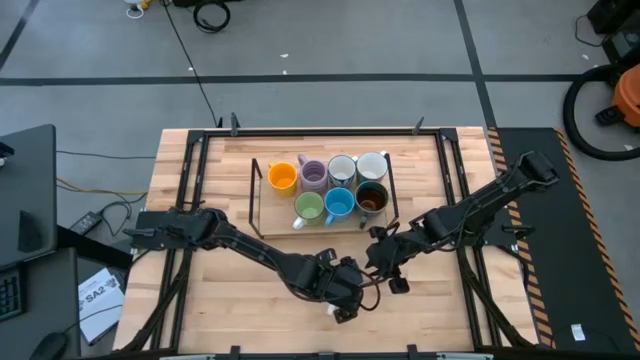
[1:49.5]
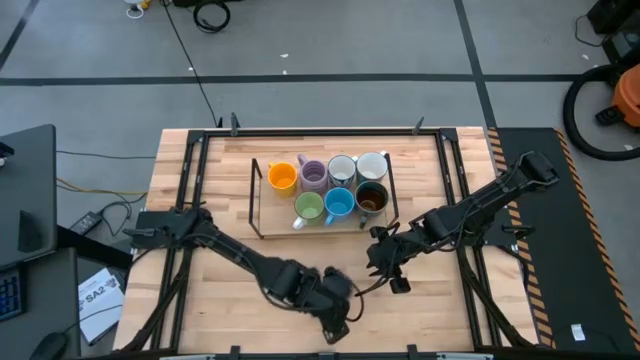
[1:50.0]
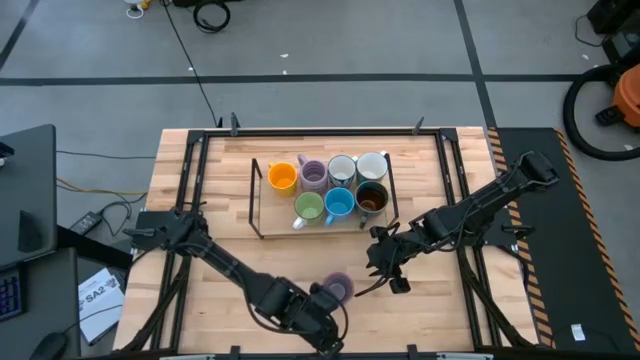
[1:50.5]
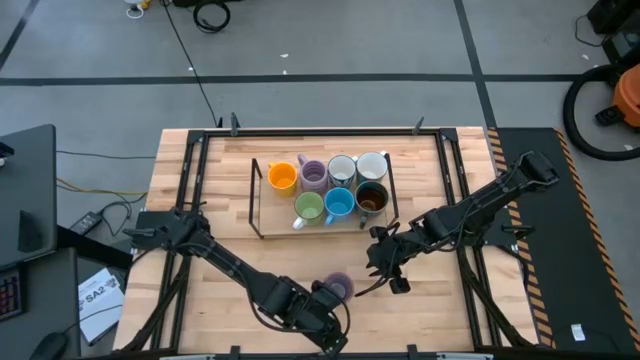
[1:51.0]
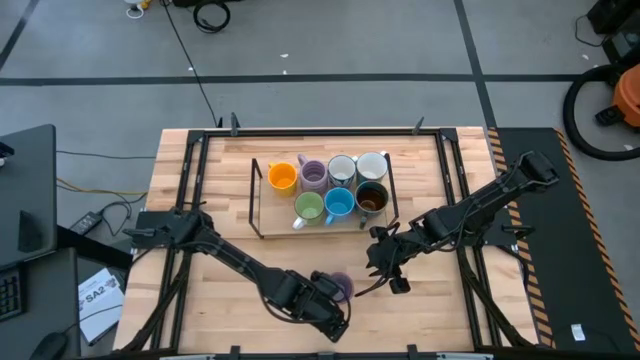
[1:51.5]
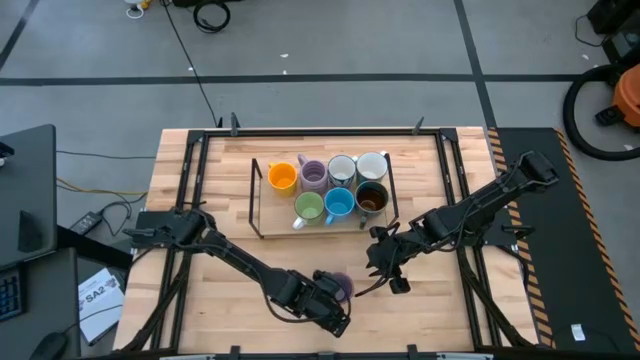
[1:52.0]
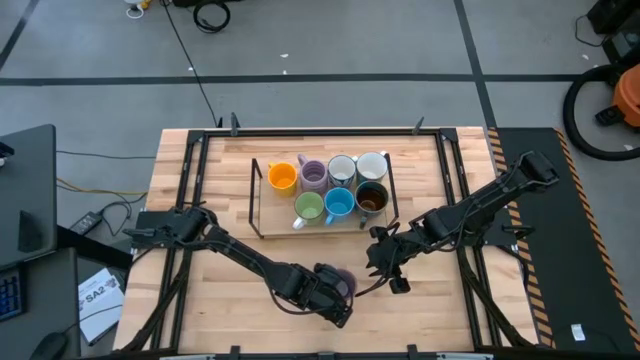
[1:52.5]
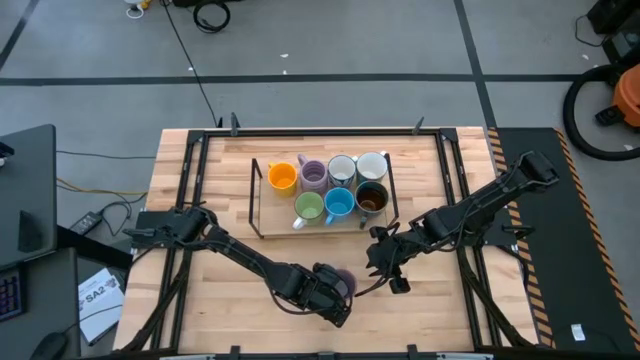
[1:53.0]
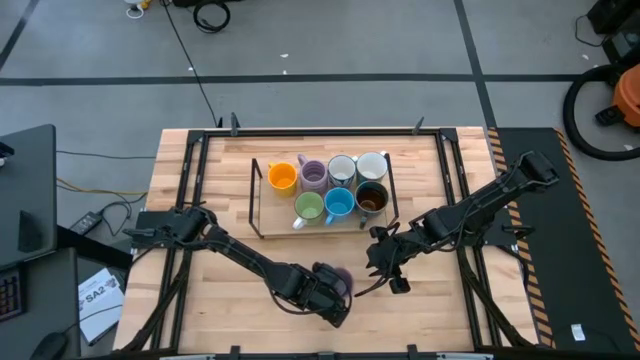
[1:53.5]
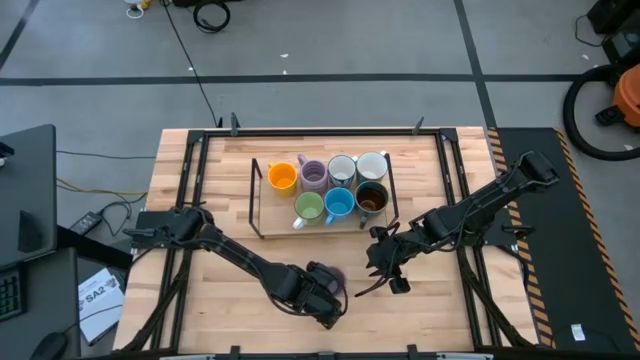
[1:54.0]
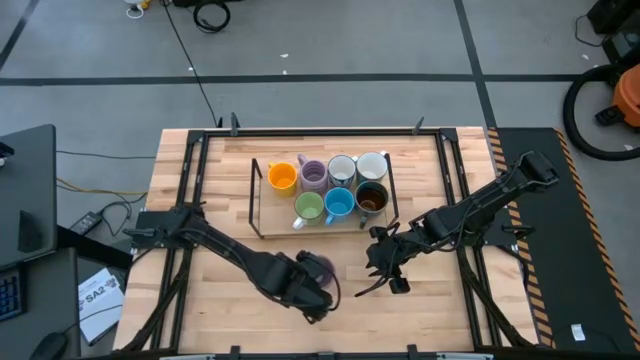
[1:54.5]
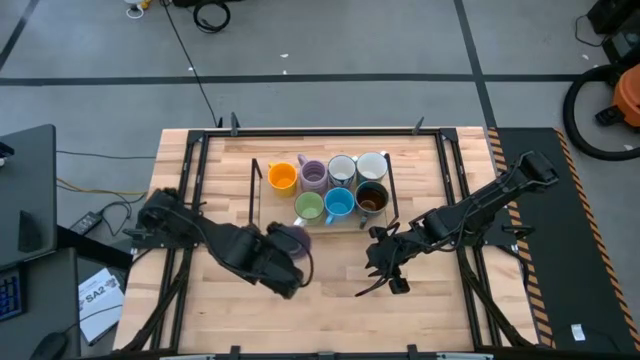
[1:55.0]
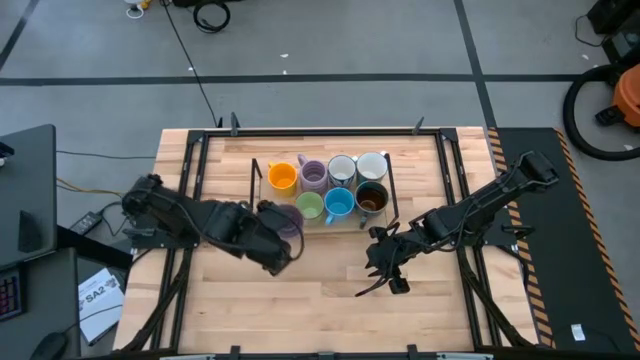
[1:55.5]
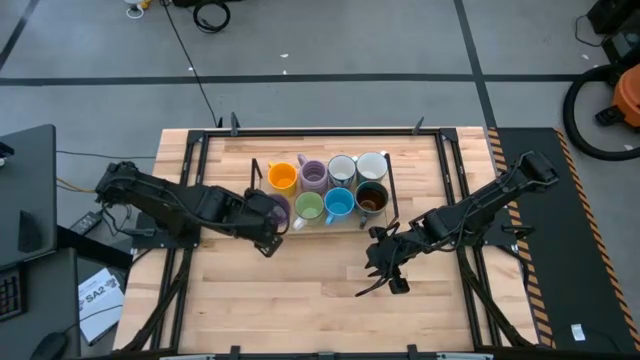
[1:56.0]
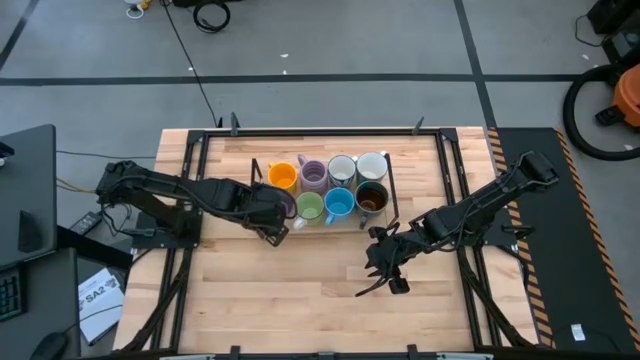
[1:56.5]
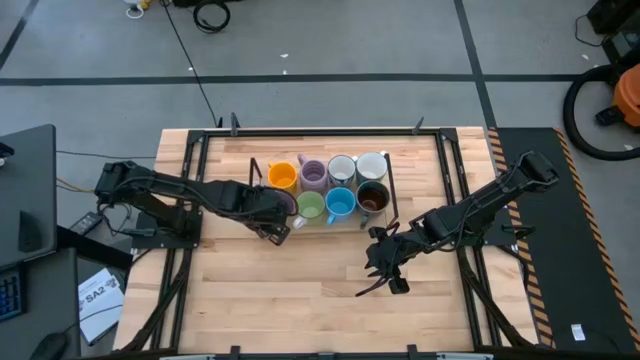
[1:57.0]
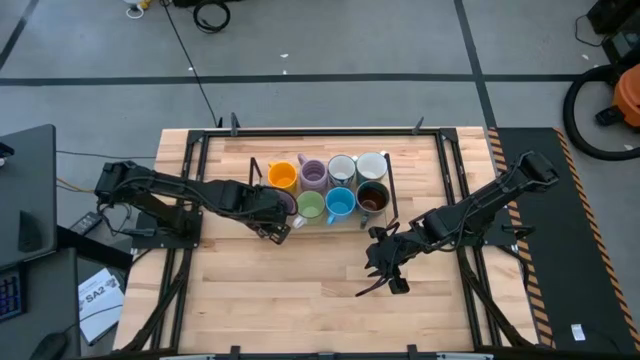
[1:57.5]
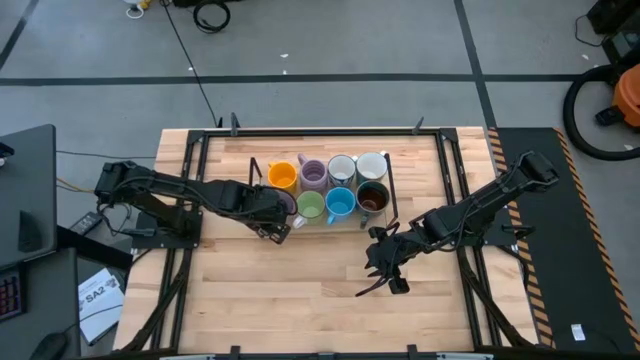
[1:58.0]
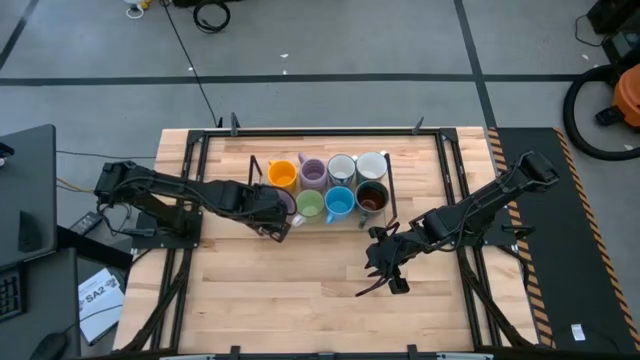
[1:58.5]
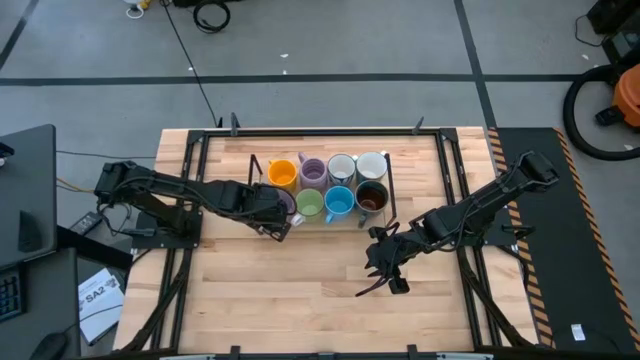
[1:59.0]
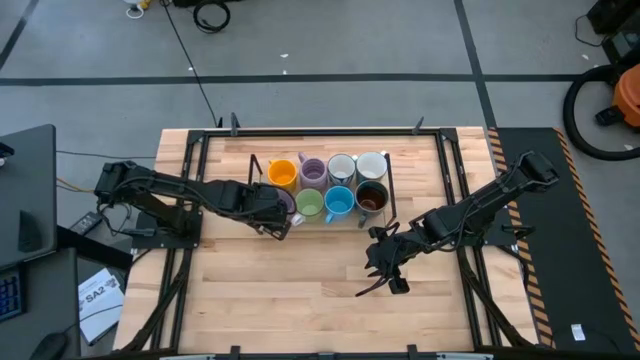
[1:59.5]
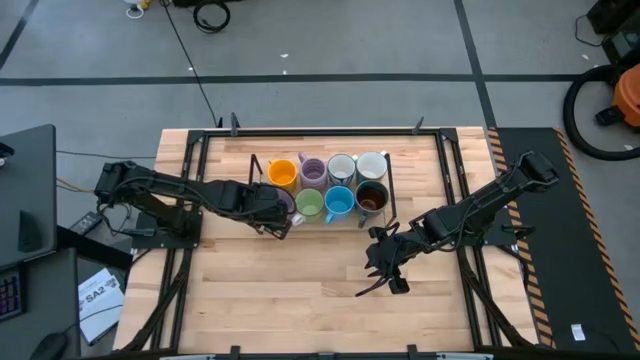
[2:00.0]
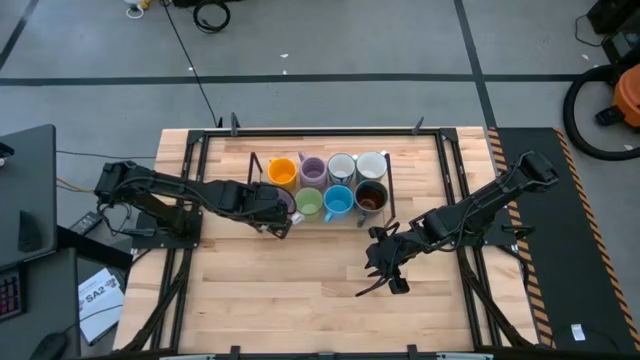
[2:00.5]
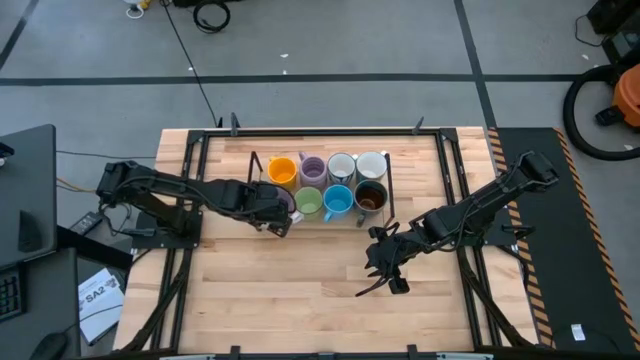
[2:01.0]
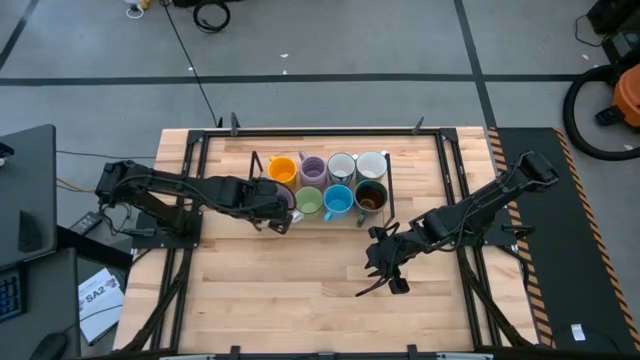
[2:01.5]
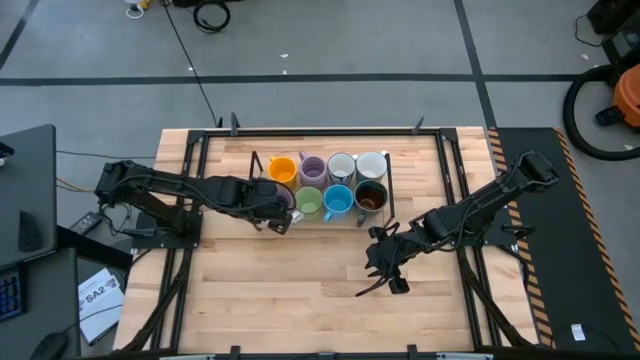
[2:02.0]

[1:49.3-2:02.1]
Task: Place coffee mugs
Put the purple mug on the shelf
